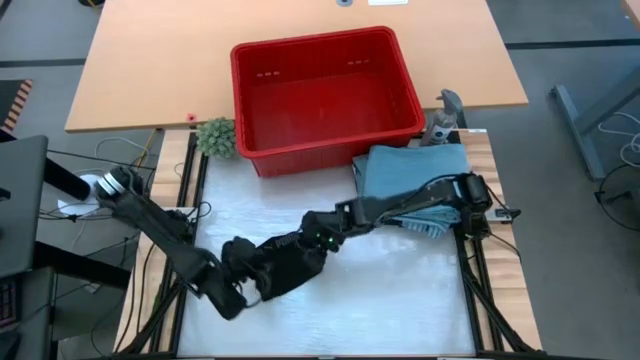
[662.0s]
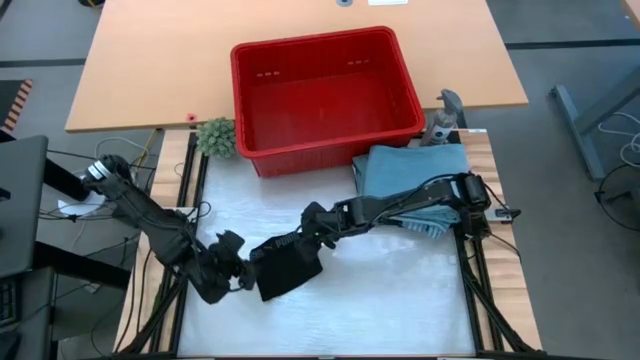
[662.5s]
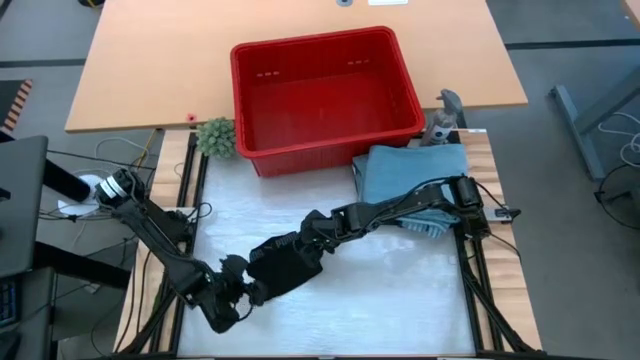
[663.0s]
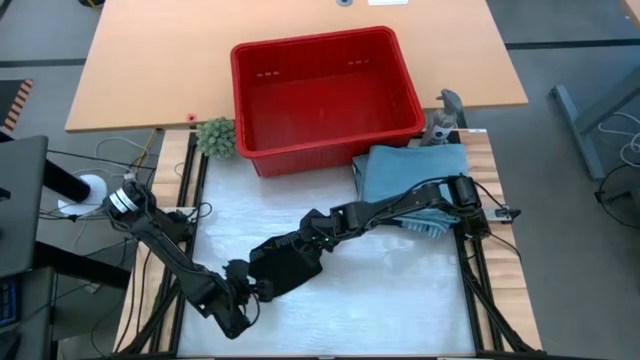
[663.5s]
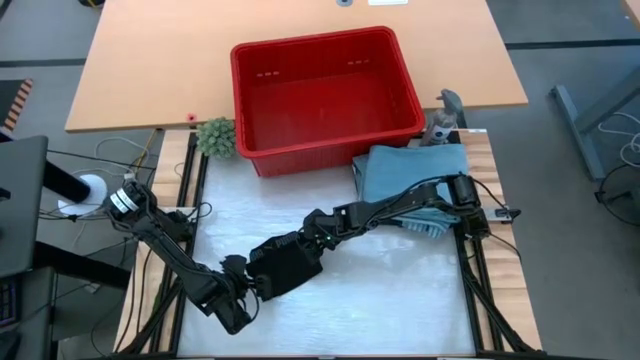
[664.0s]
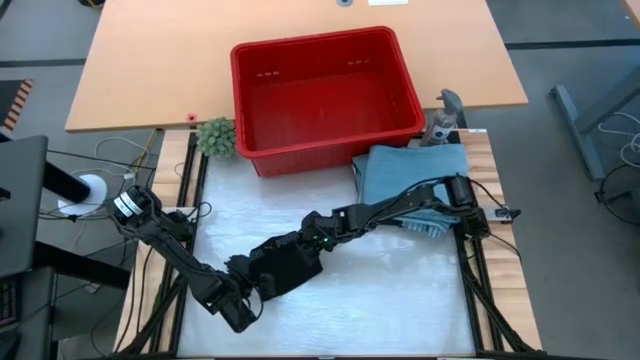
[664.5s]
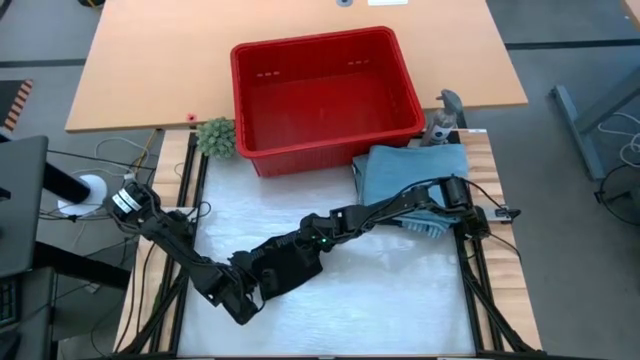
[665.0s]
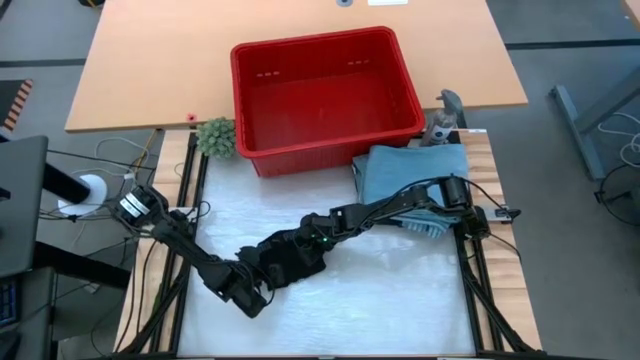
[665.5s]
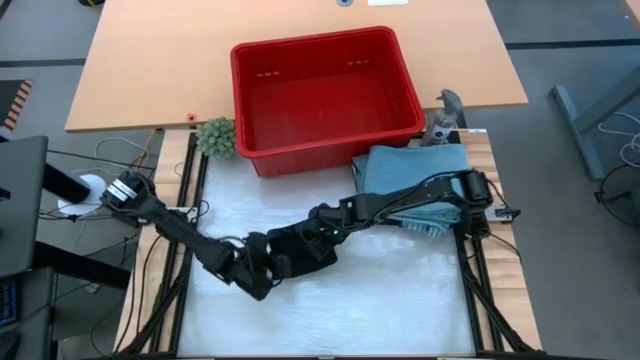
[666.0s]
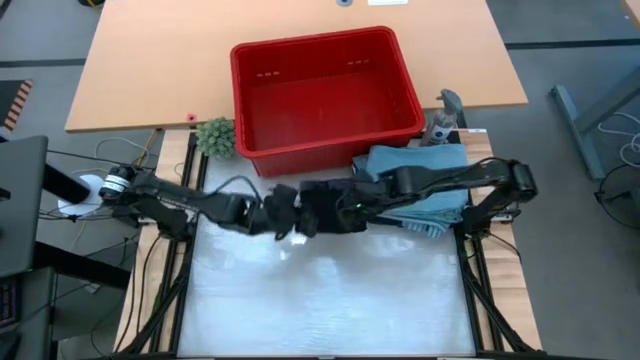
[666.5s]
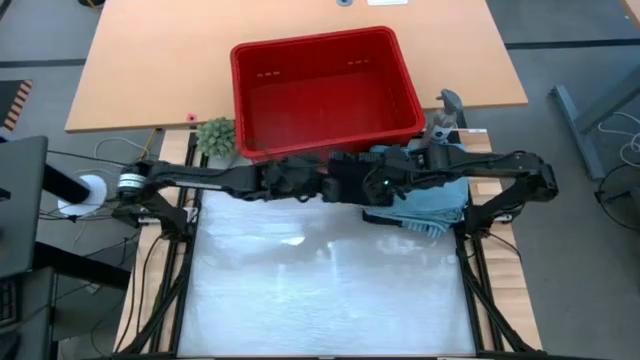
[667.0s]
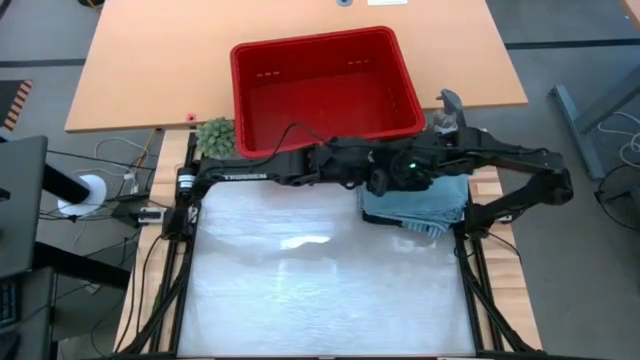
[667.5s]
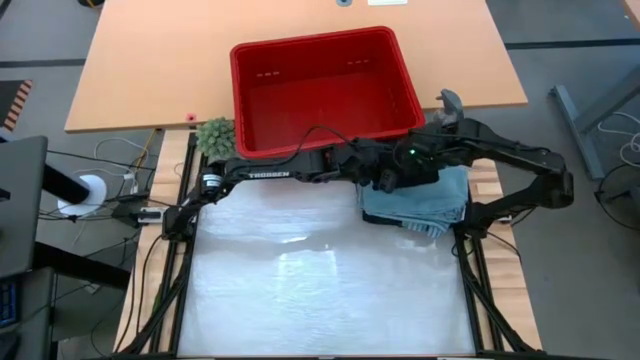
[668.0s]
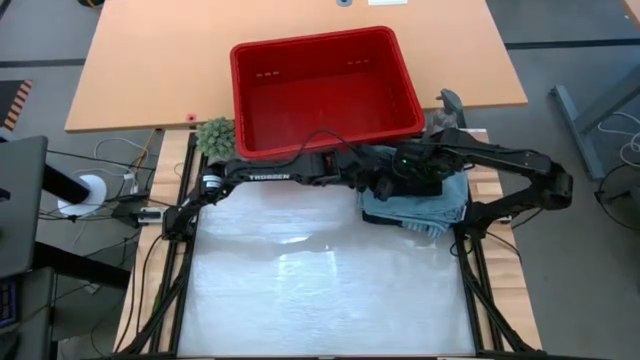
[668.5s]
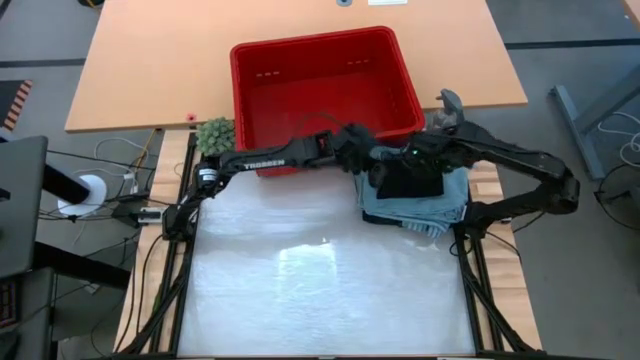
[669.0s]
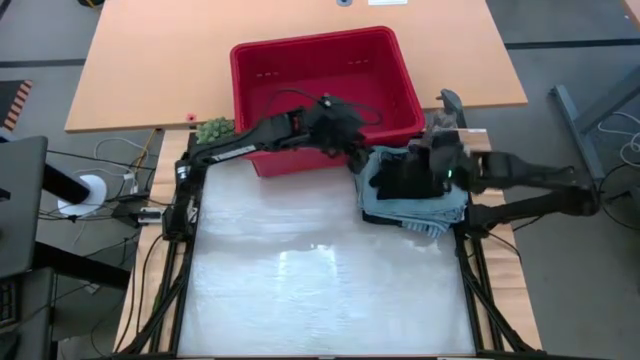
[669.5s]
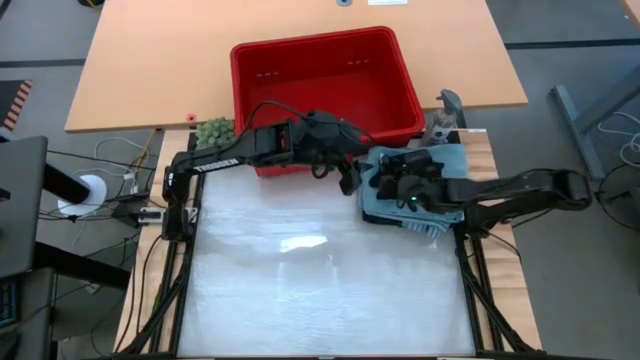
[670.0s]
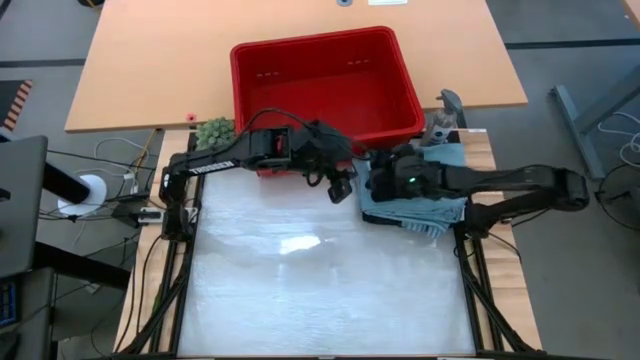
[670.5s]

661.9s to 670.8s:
Task: Fold Laundry from Bin
Stack the folded black boxer short on top of the folded blue pants

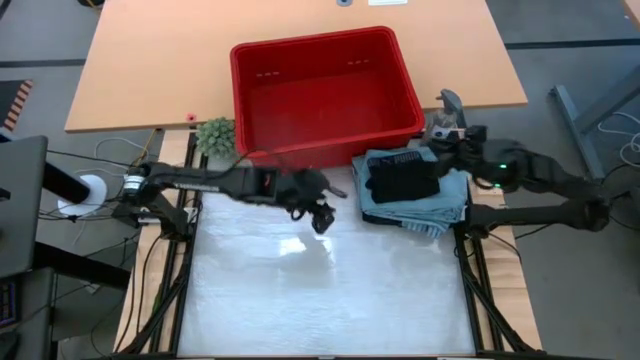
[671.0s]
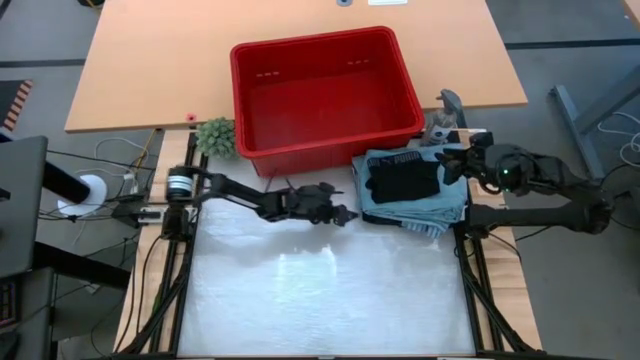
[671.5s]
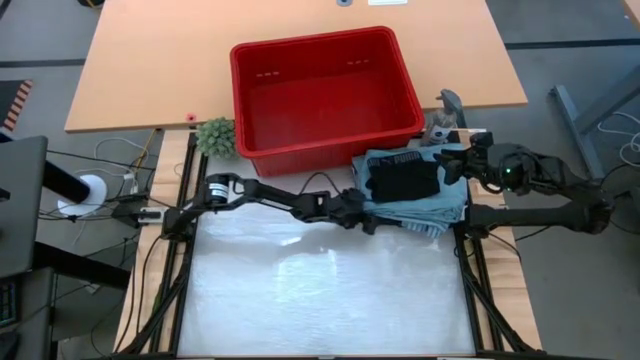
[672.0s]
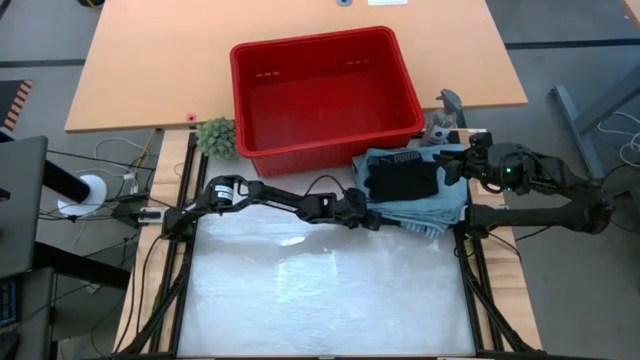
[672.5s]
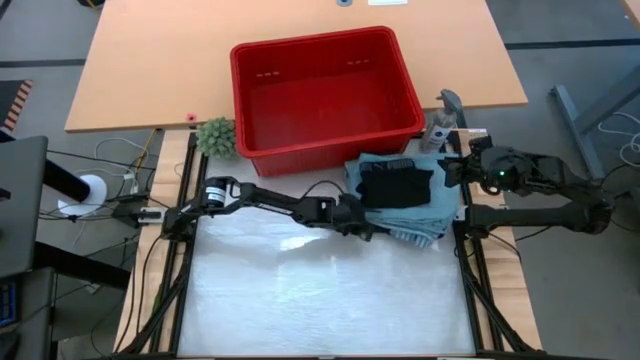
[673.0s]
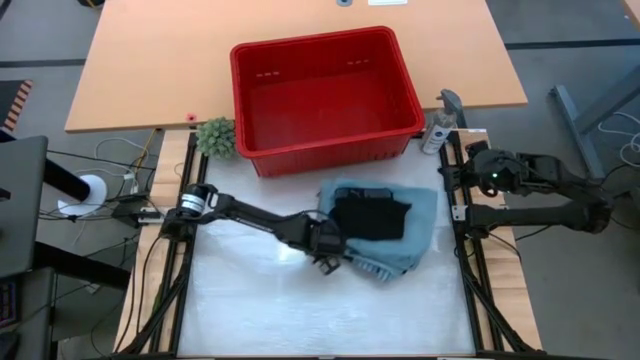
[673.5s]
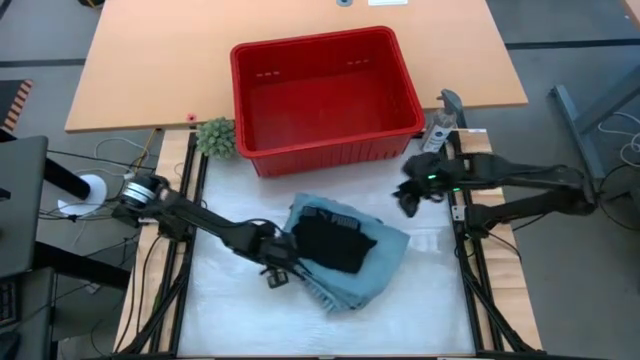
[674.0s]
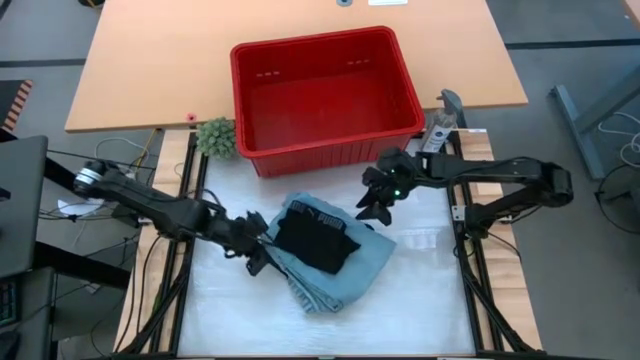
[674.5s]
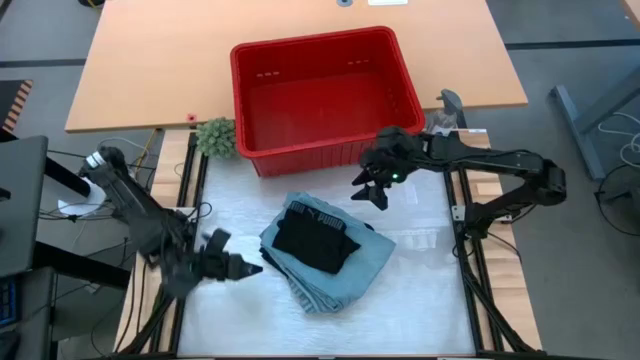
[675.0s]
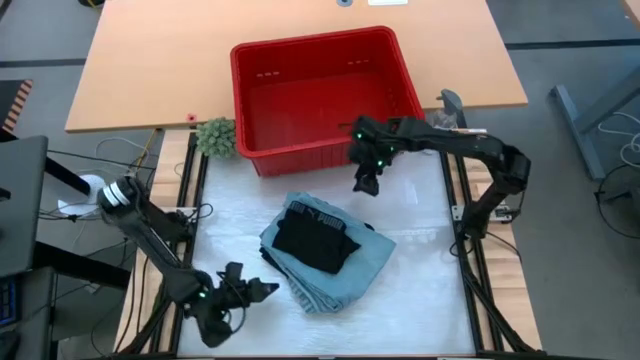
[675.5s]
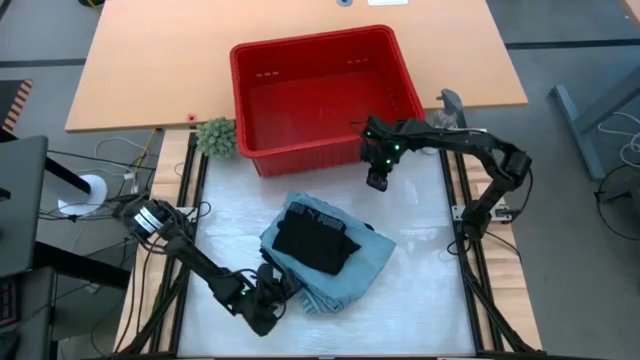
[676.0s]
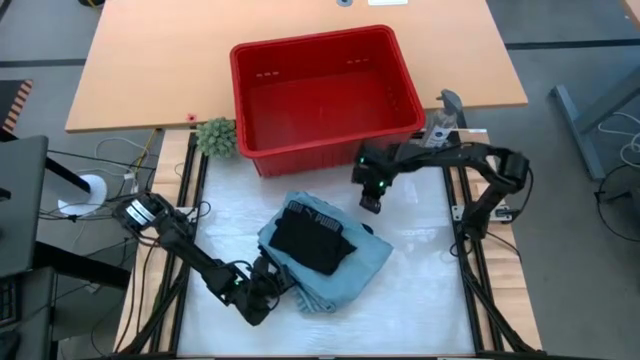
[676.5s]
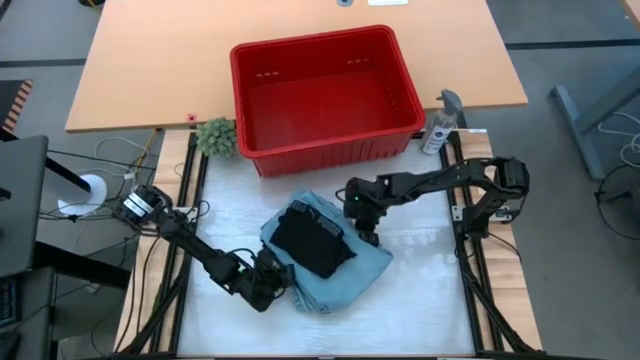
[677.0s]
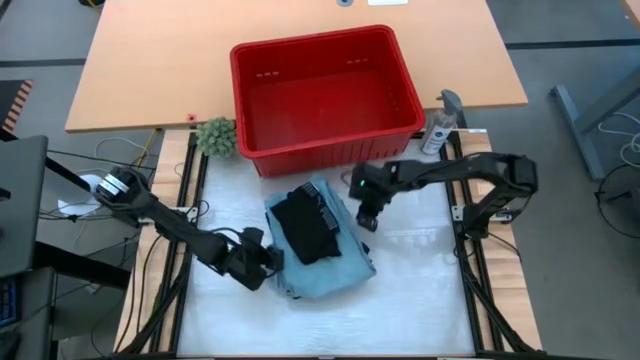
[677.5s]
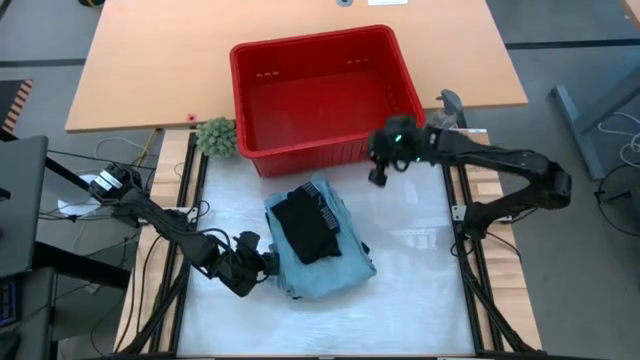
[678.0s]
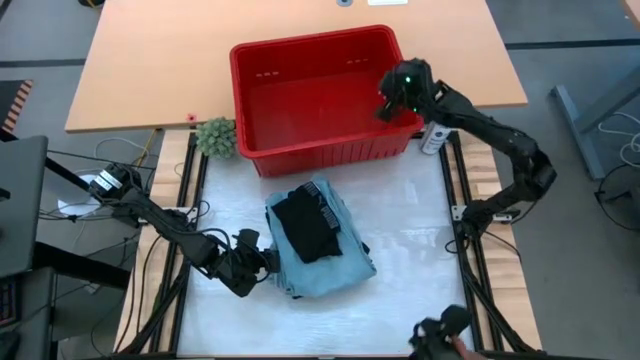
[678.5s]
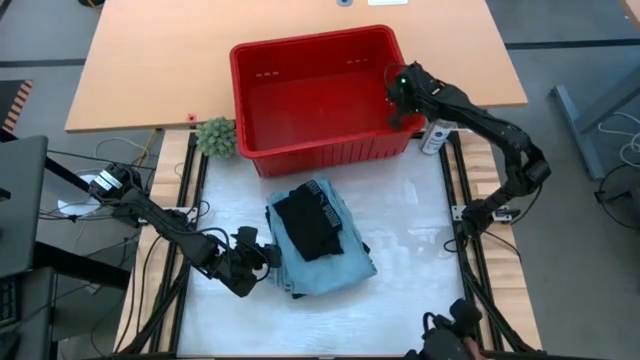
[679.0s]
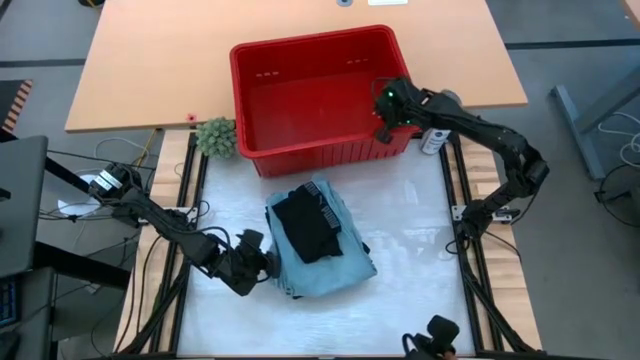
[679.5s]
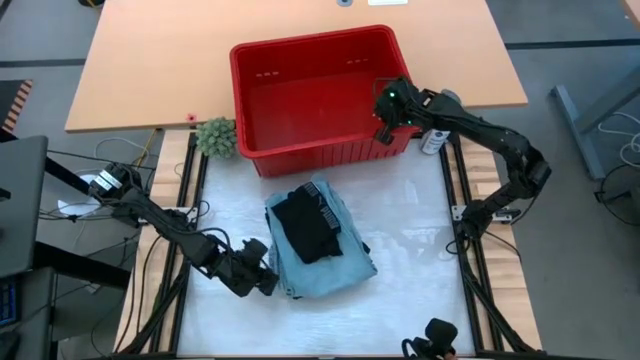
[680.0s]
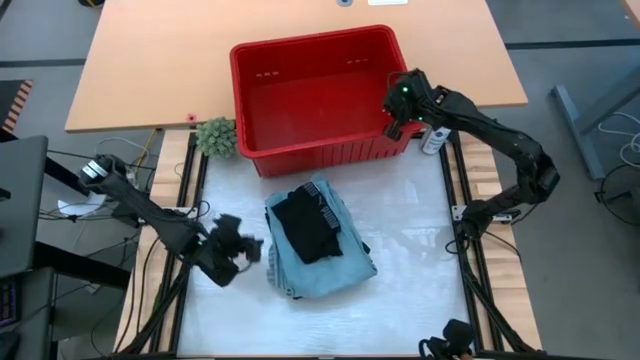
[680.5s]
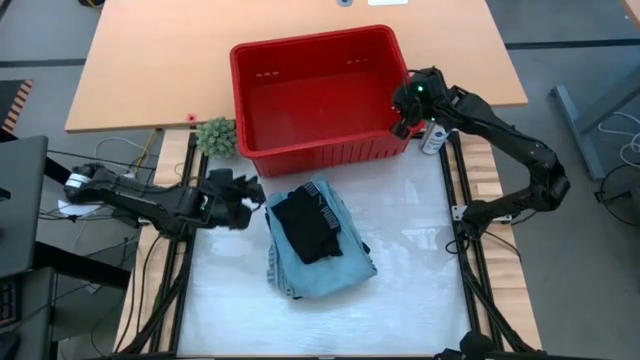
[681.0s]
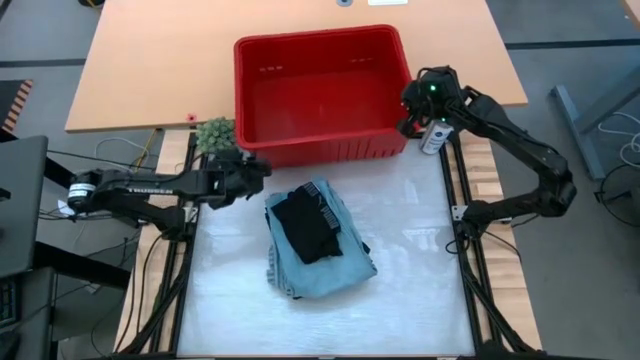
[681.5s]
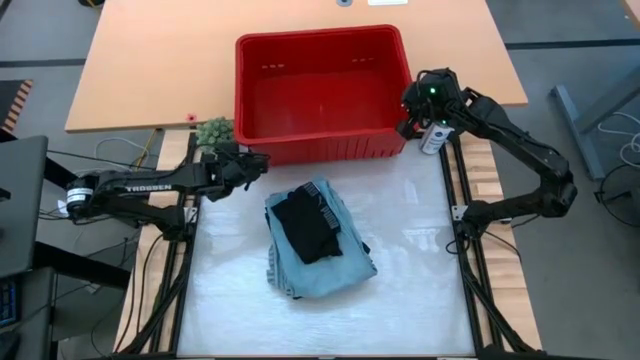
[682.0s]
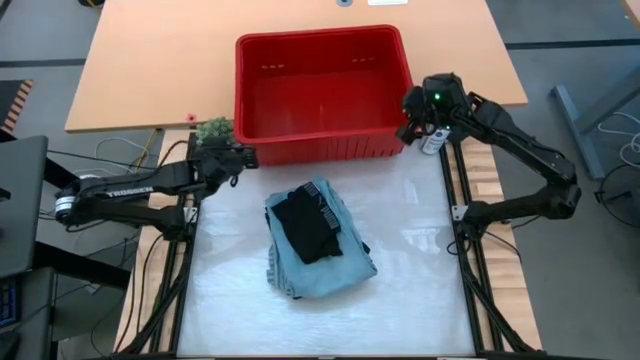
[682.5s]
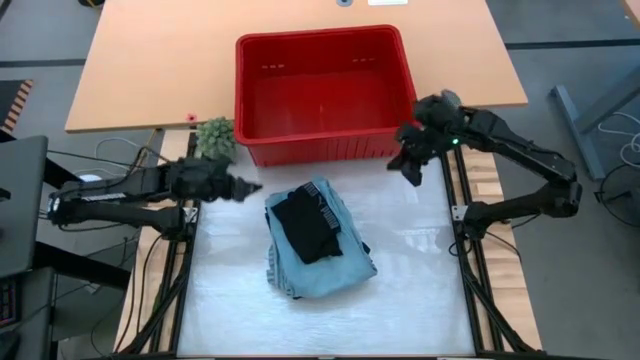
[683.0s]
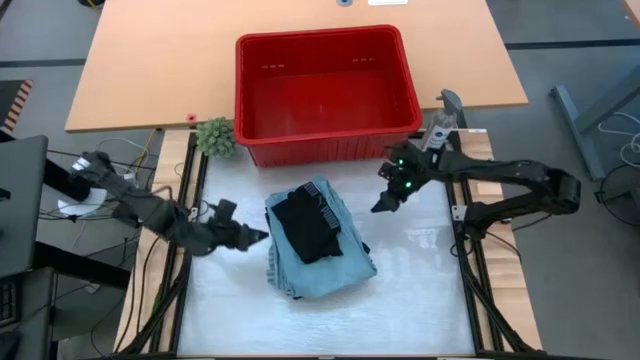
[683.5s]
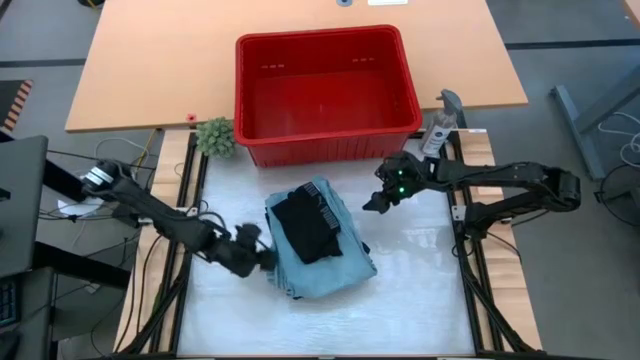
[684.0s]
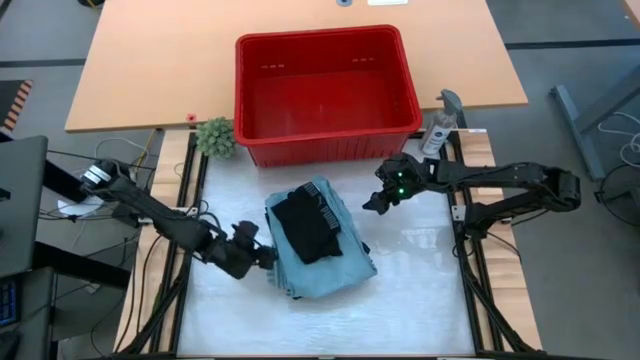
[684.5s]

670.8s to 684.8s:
Put the stacked clothes into the red laundry bin
